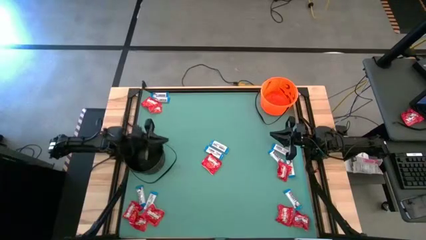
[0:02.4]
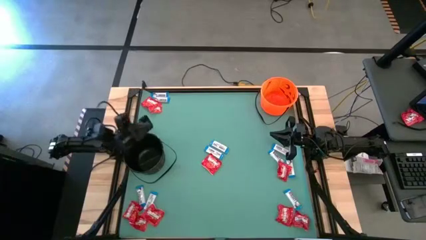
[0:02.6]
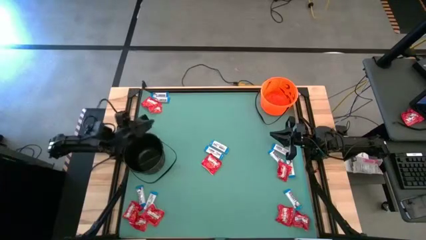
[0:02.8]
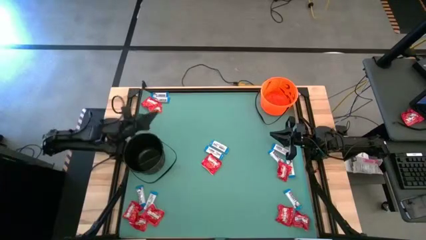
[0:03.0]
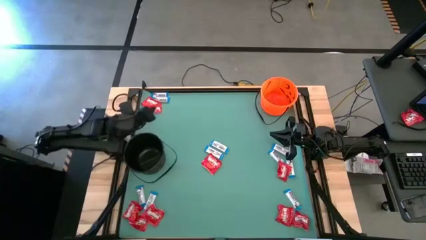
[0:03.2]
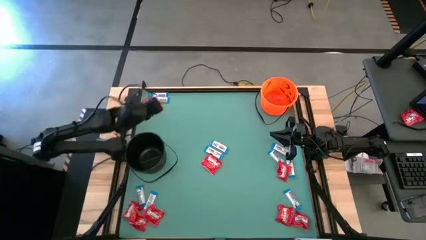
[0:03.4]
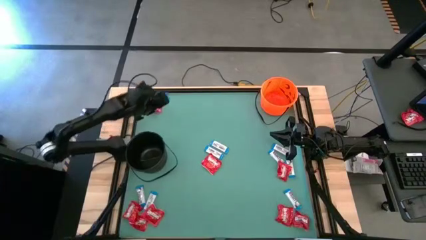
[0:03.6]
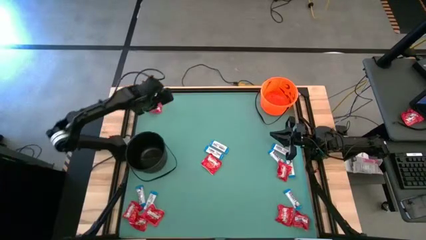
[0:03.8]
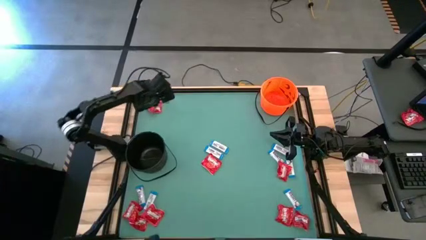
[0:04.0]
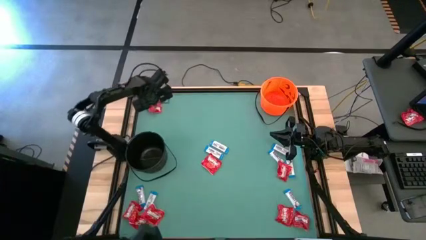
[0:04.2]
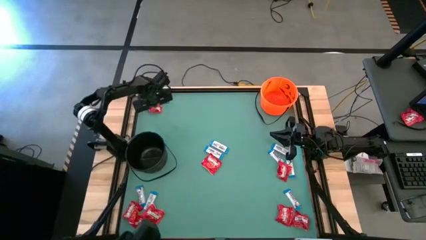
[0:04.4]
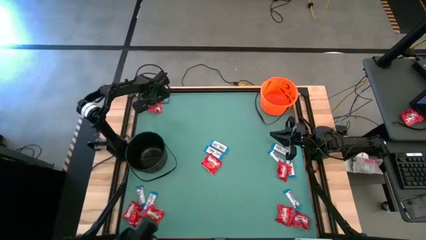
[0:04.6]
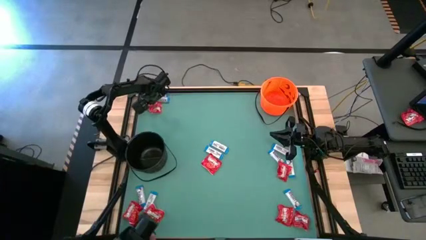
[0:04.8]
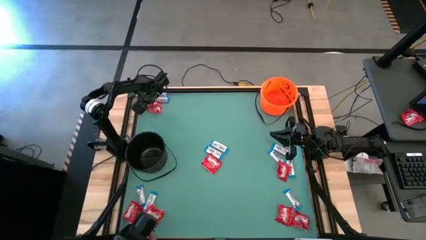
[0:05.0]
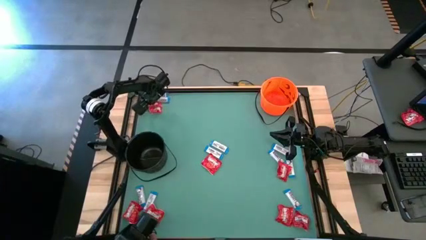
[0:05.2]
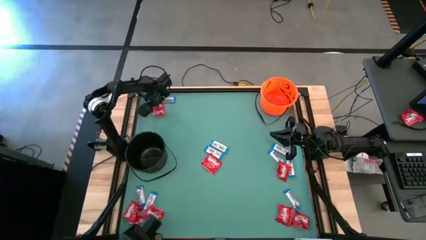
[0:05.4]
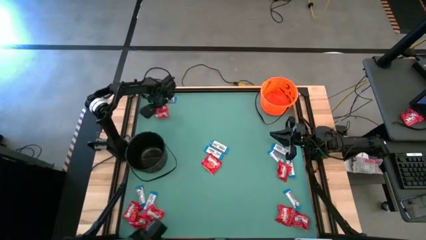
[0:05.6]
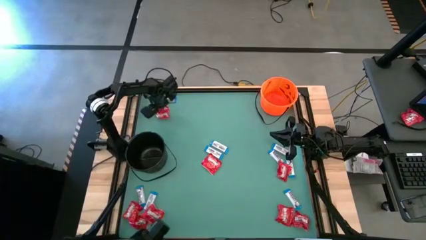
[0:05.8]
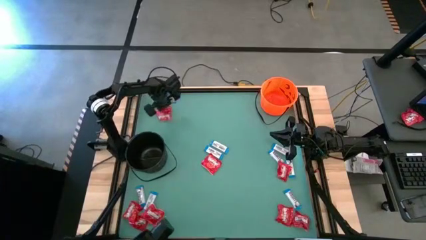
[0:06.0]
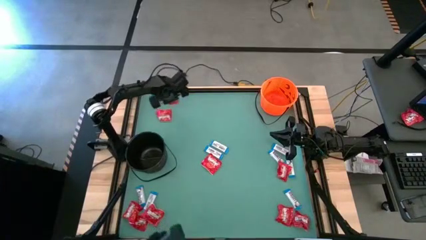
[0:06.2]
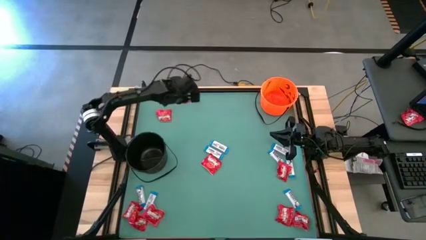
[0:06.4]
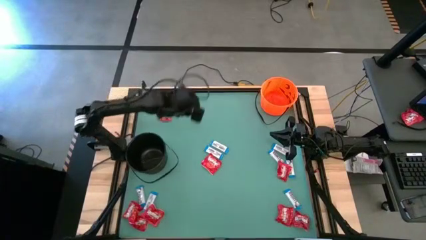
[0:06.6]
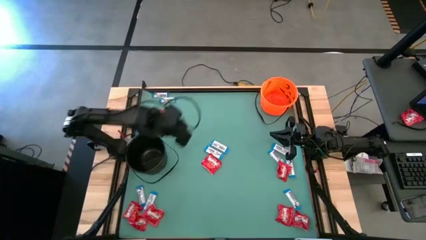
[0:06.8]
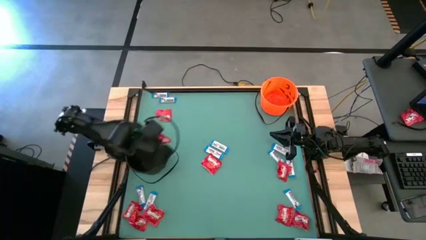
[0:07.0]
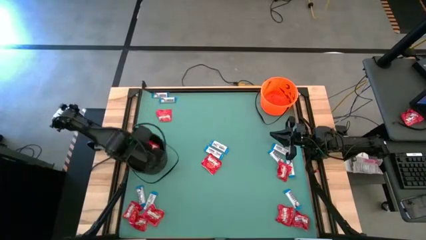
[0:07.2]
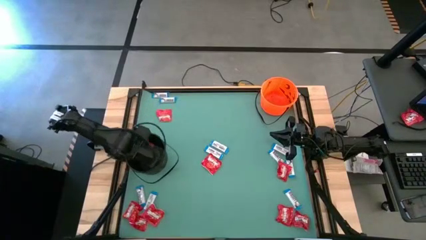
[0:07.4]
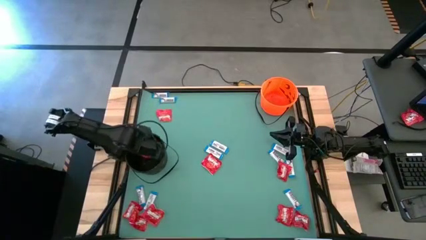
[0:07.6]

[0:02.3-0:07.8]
Task: Sort candy by brand, put in halloween buckets
Put the red candy into the black bucket

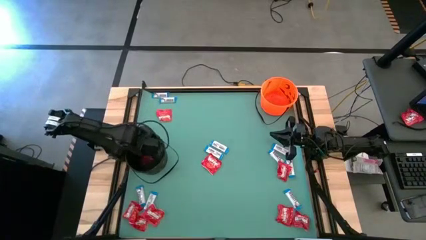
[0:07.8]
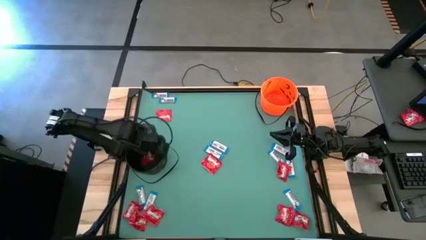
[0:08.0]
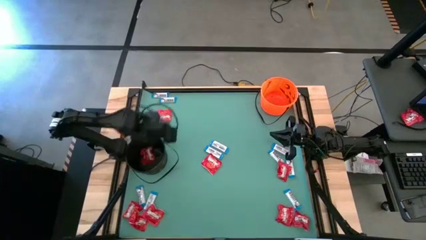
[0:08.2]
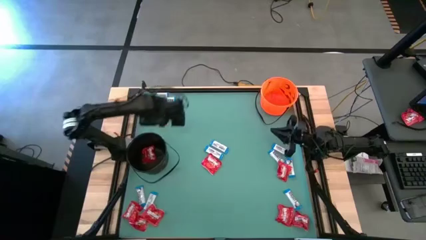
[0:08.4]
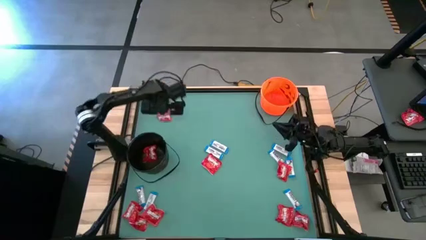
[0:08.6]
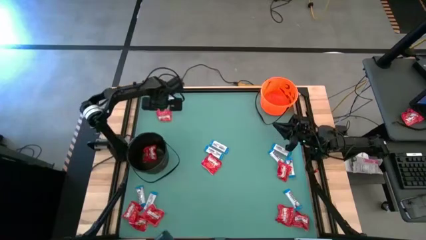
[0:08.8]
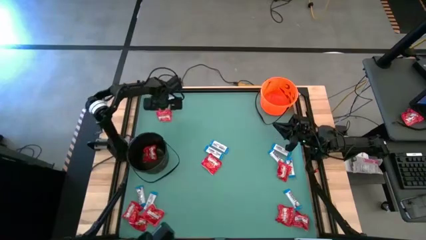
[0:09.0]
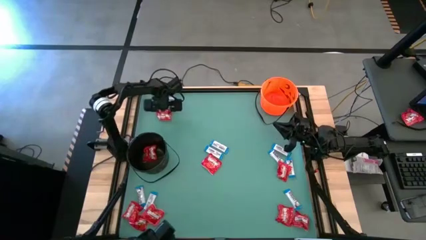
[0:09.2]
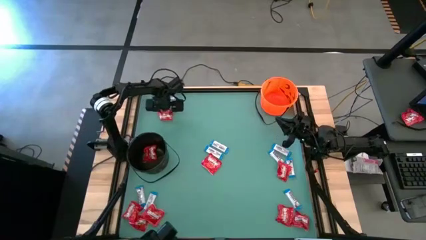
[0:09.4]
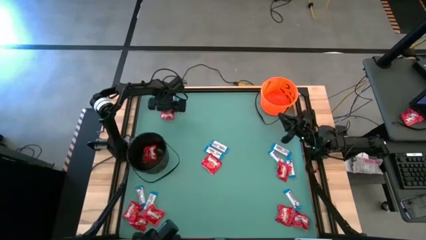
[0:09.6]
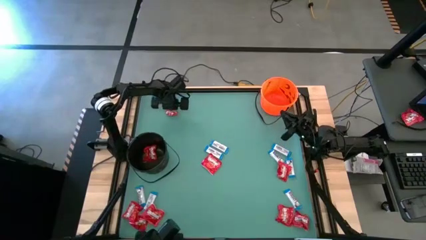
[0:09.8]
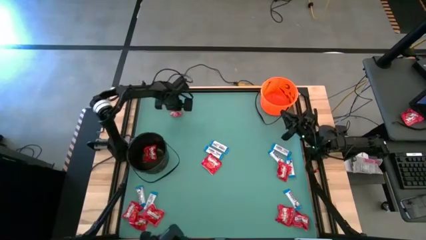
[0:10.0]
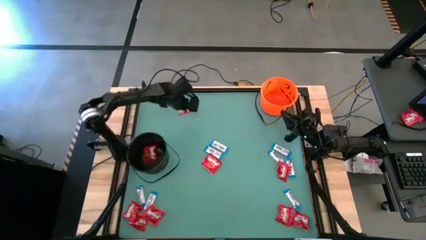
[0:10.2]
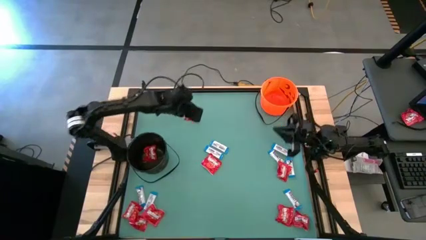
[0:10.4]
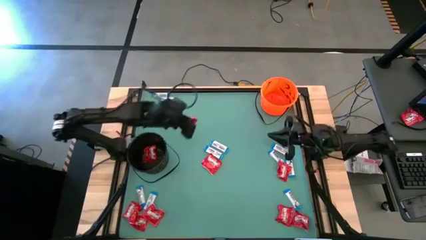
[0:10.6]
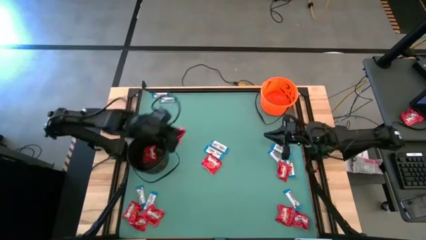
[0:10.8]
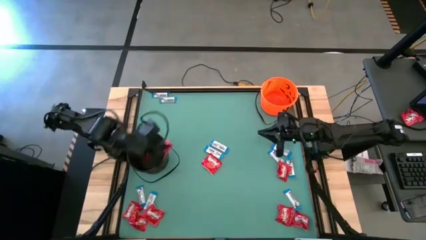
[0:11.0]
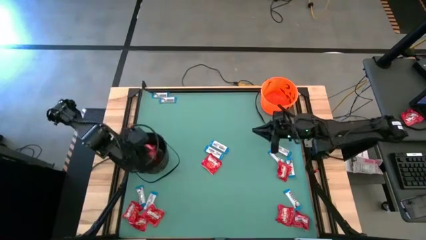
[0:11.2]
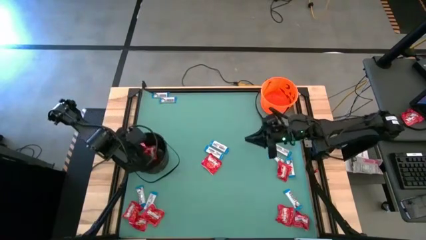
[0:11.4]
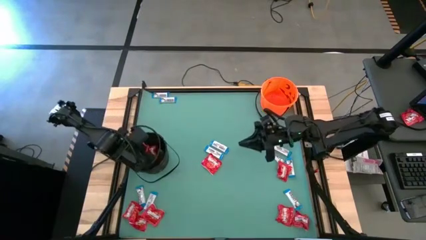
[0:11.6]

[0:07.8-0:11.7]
Put the red candy into the black bucket

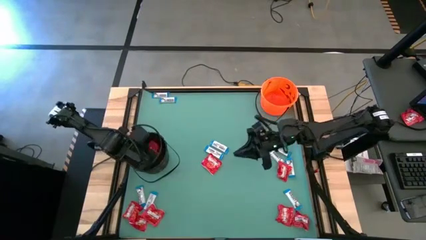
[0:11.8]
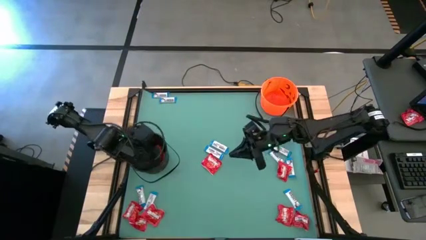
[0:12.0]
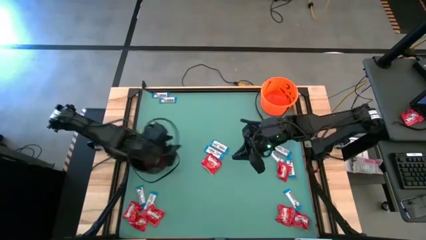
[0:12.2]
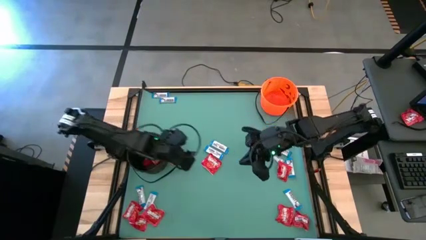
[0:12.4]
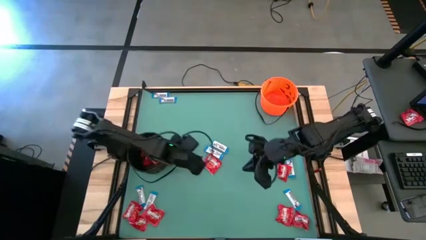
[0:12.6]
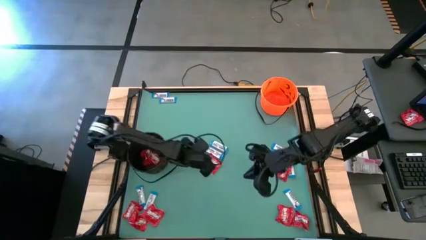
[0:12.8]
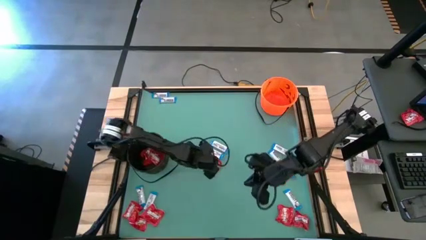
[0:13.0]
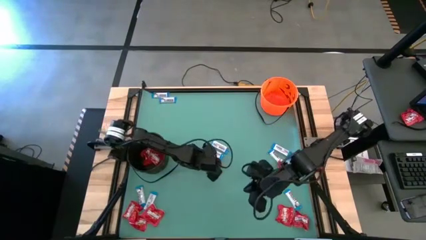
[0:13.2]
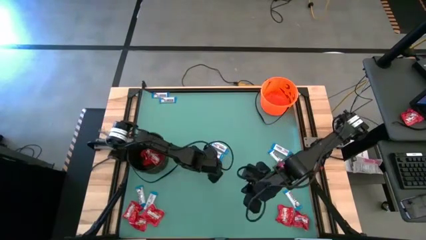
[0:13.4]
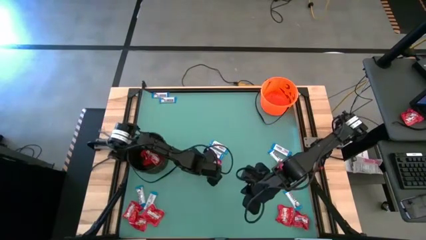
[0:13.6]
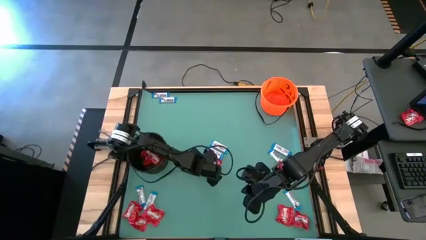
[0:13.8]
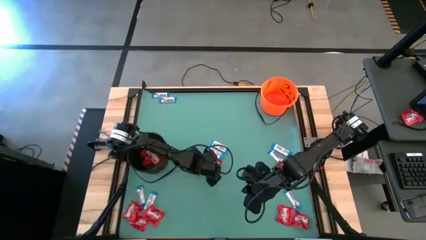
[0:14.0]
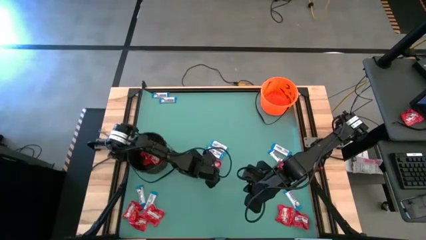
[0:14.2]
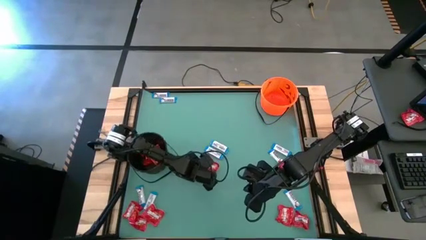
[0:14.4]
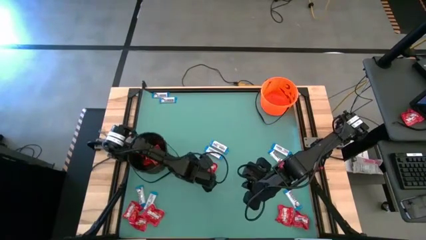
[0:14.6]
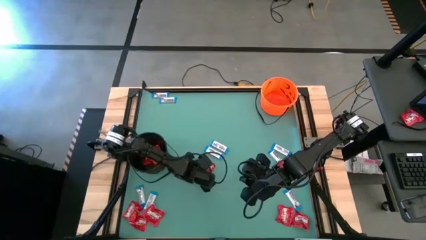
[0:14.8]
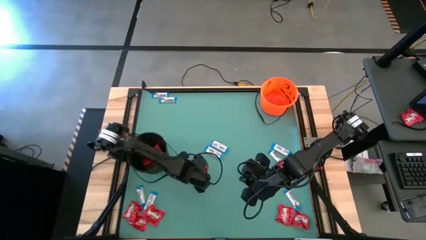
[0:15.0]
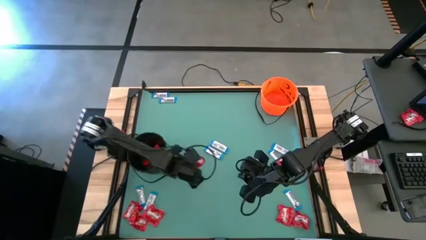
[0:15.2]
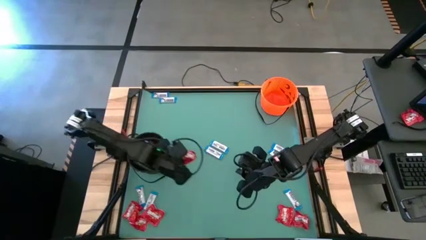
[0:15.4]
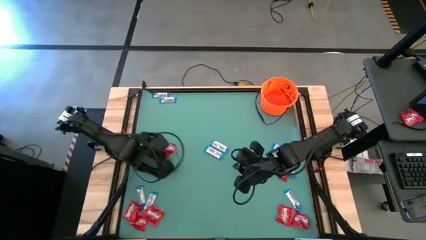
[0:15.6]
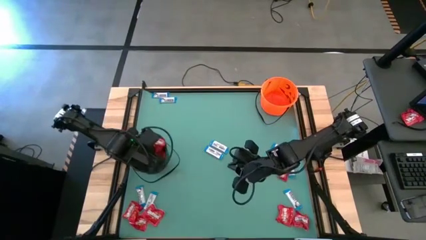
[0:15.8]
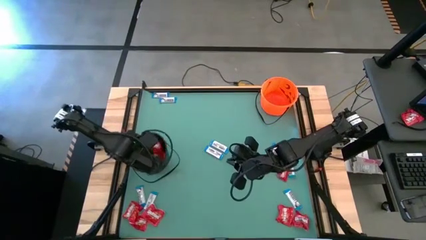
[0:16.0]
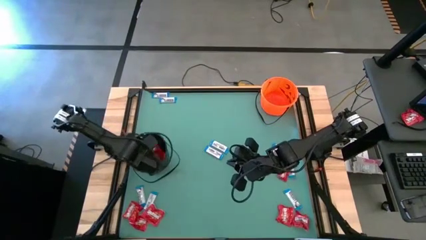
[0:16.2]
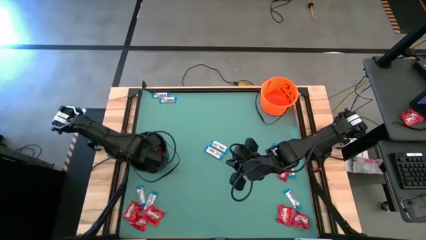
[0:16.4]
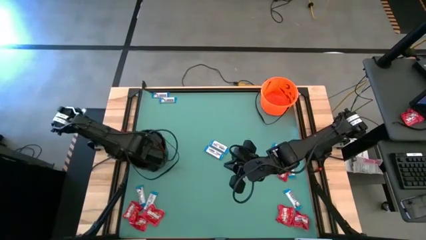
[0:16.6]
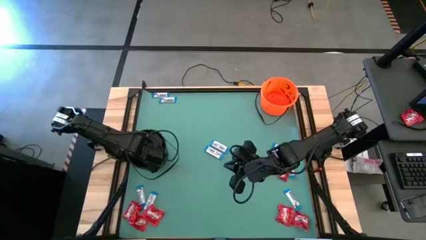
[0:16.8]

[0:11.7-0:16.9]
Put the red candy into the black bucket

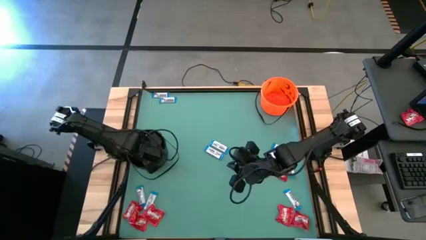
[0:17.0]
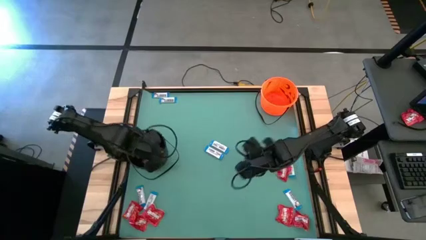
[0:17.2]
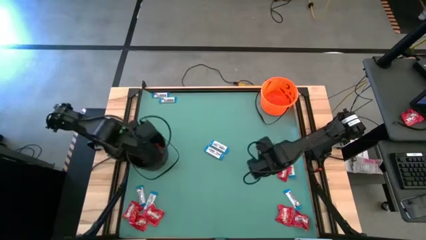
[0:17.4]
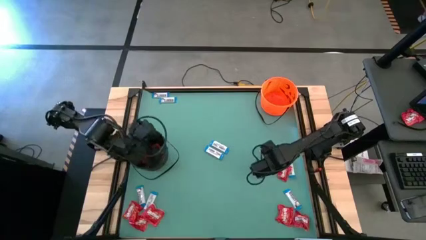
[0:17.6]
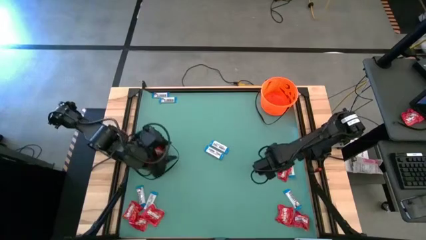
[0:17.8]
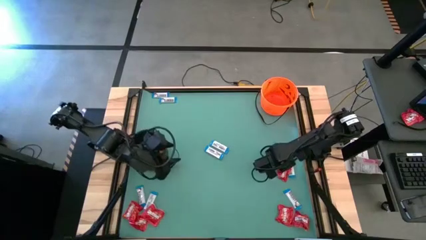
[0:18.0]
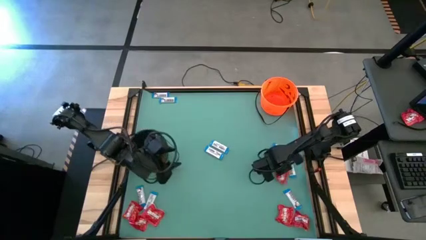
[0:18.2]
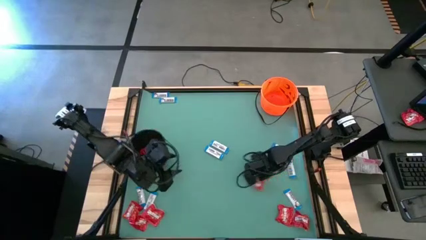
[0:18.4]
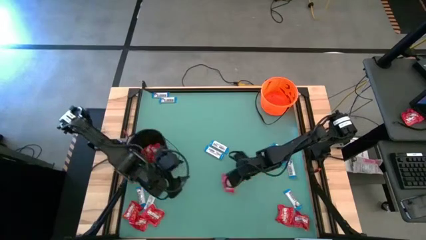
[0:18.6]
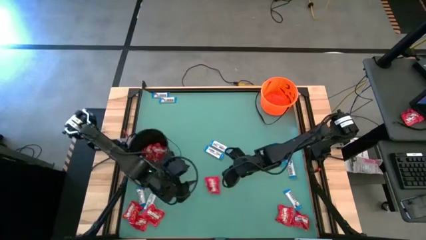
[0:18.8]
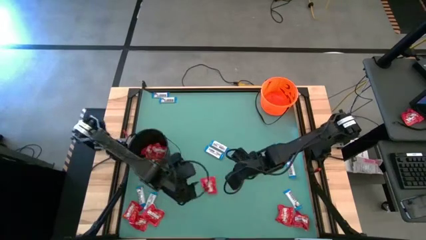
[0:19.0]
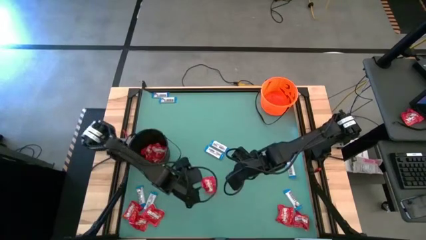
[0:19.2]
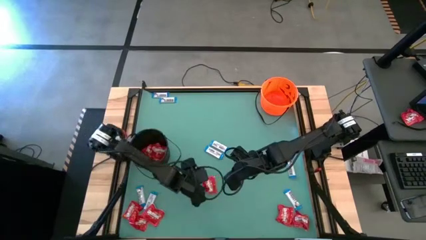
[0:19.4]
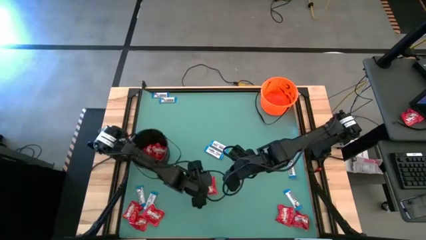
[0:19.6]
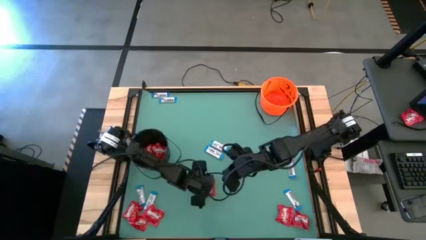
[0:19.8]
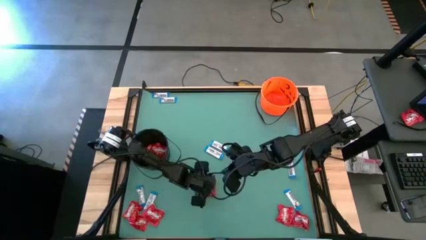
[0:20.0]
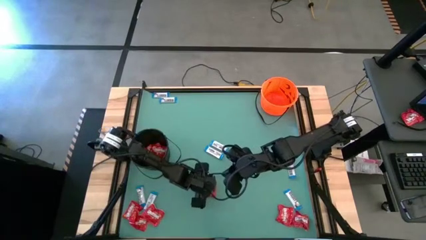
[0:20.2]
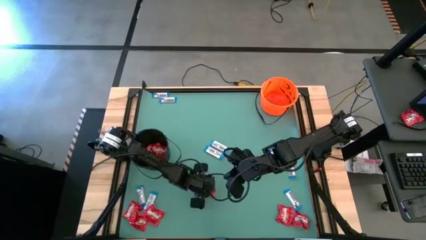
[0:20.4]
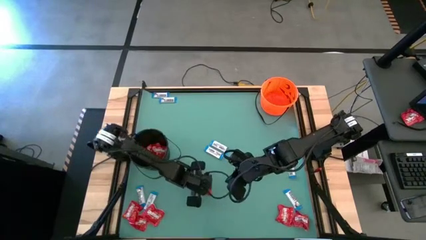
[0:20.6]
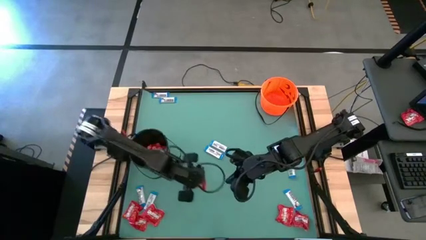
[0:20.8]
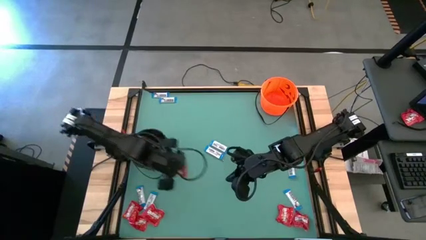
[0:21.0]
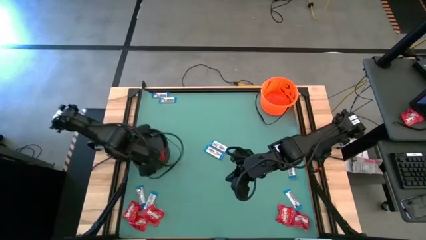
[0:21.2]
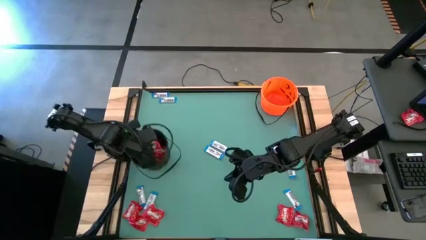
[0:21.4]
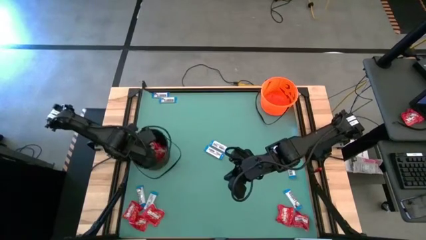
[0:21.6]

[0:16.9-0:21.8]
Put the red candy into the black bucket
